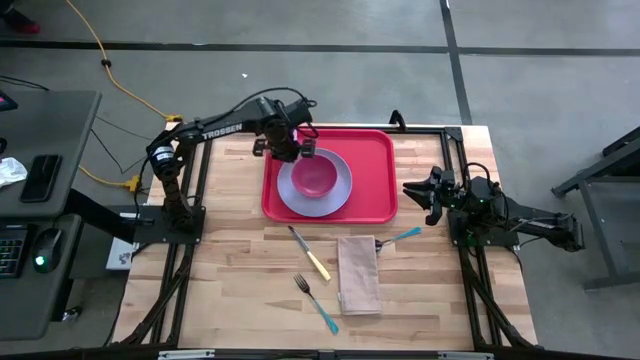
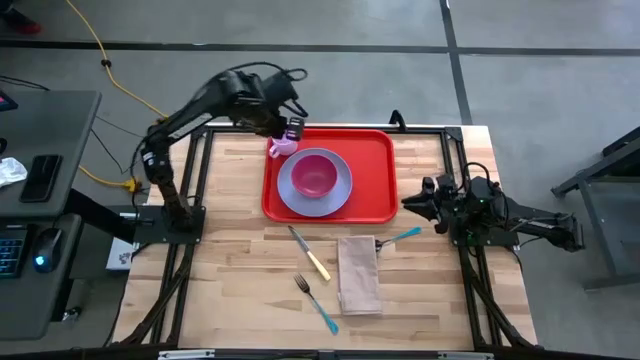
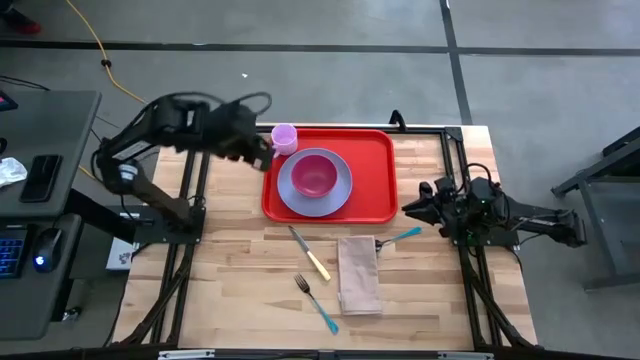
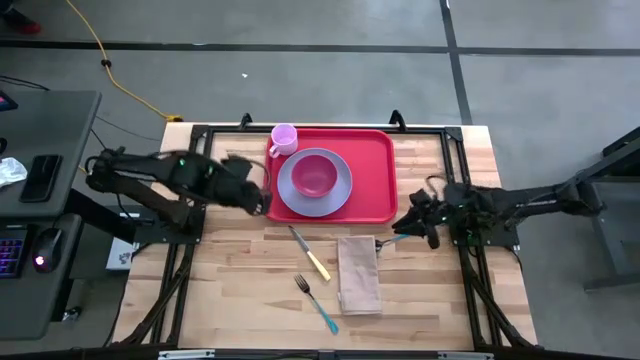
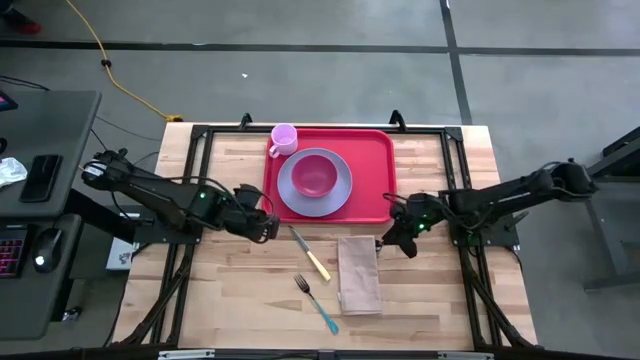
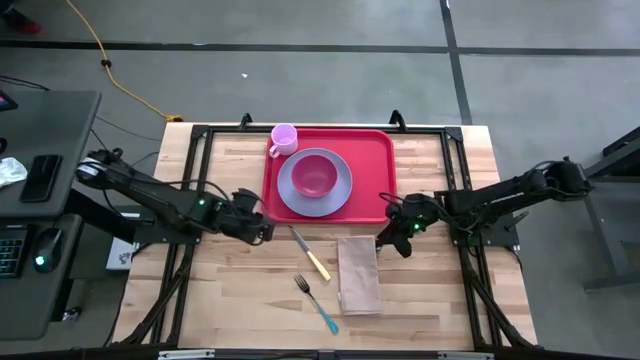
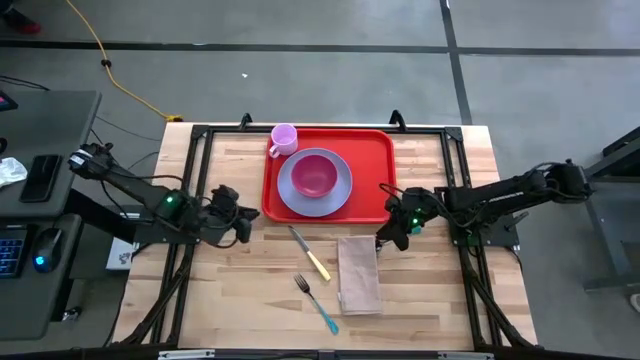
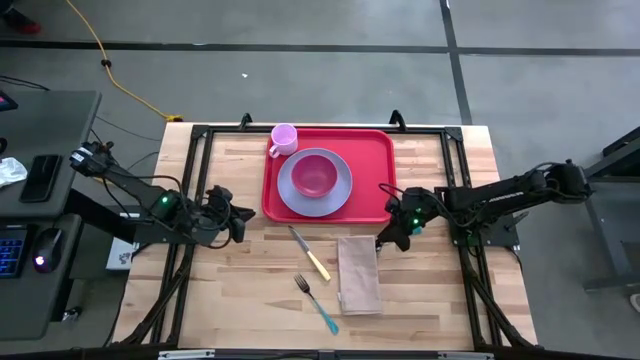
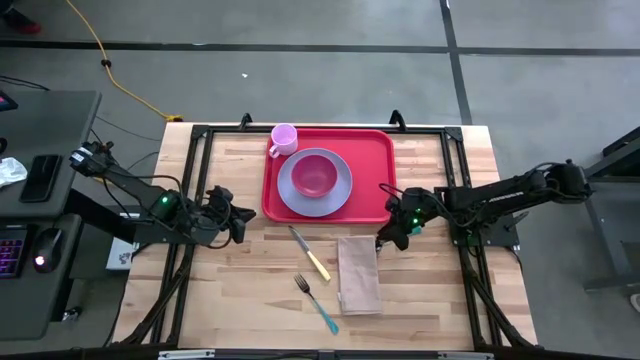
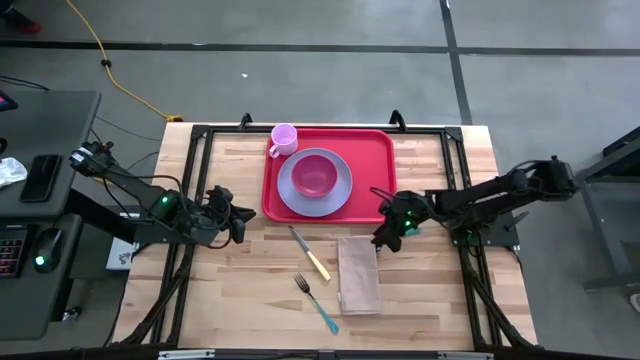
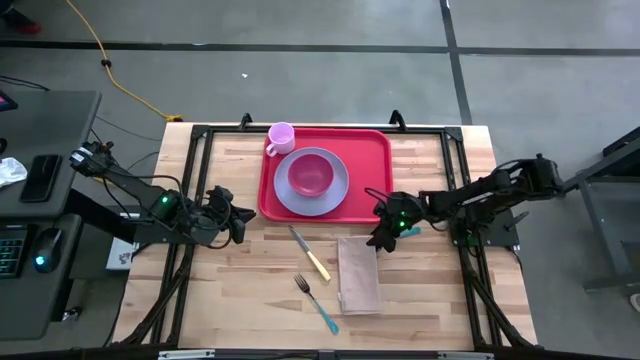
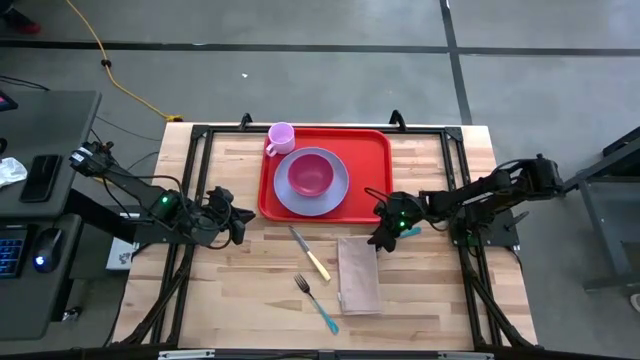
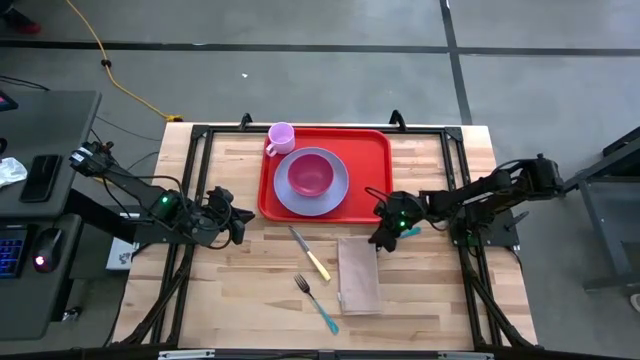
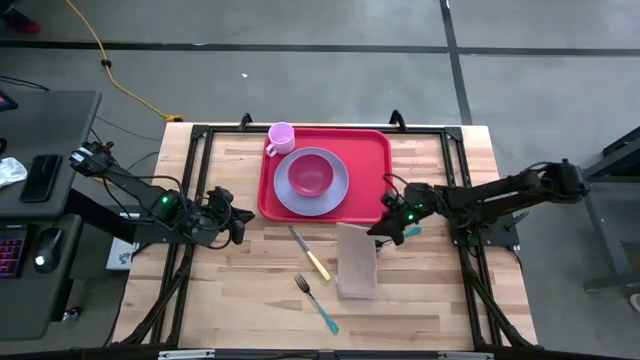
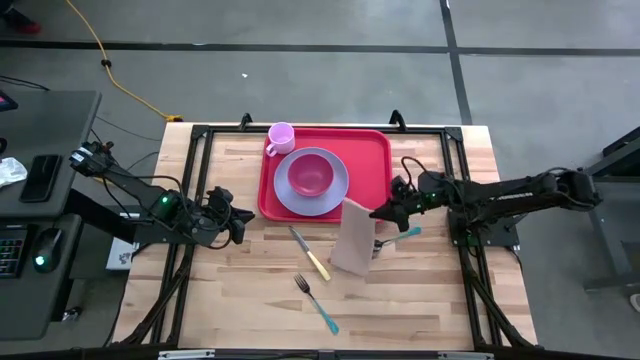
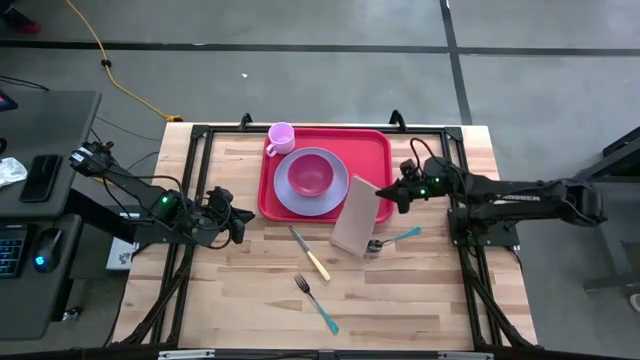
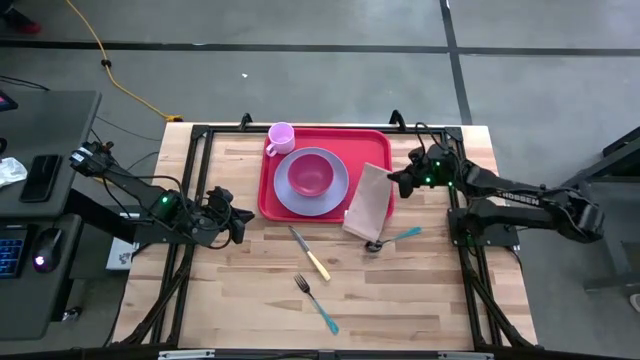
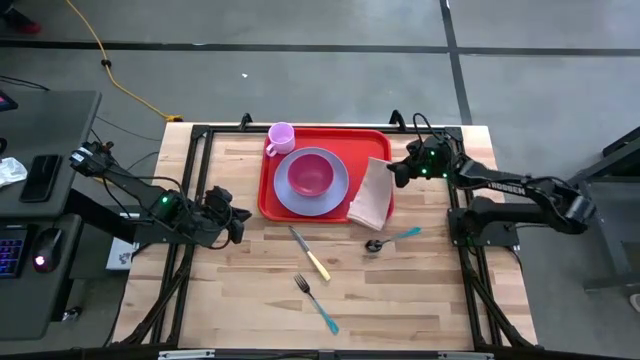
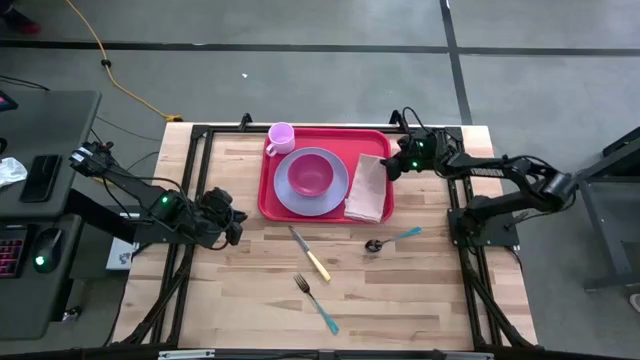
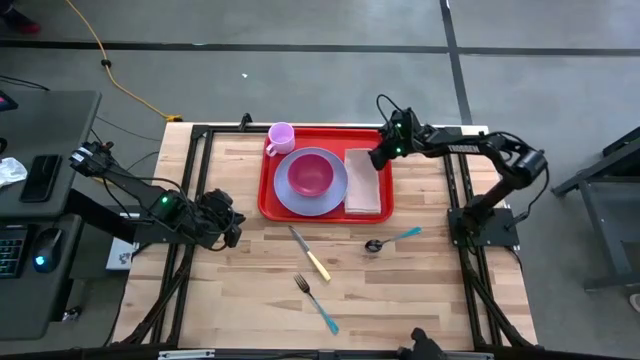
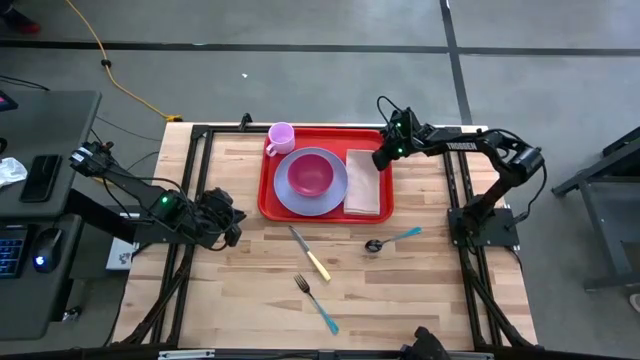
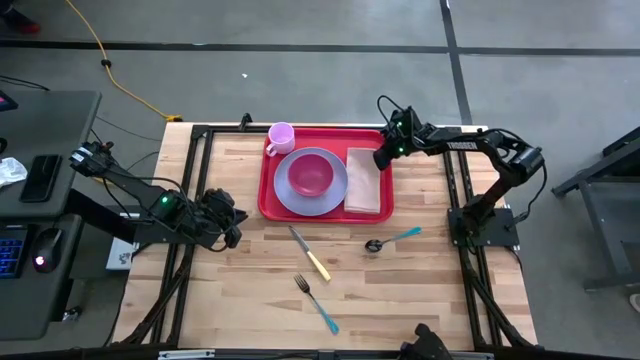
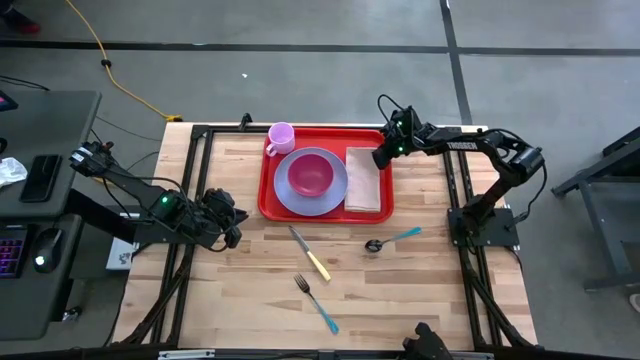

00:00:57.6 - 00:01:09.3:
Task: Set up tray
Put the light pink napkin to the right of the light blue plate on the orange serving tray

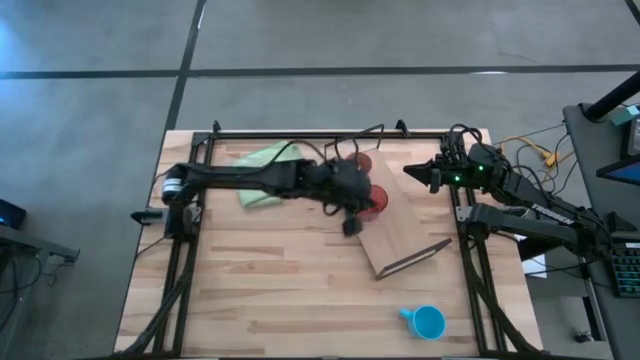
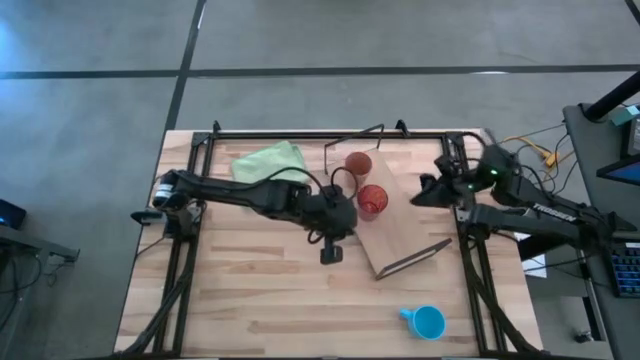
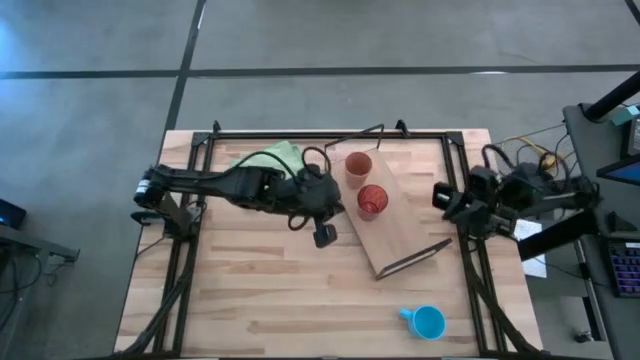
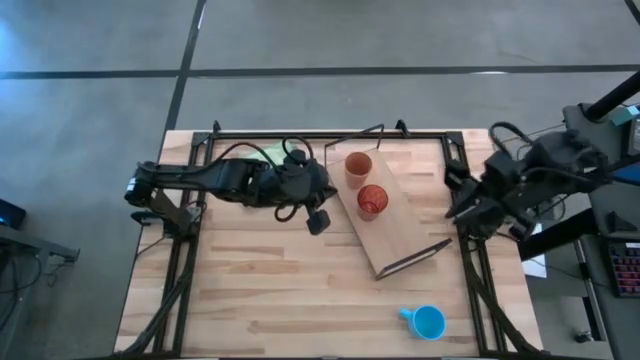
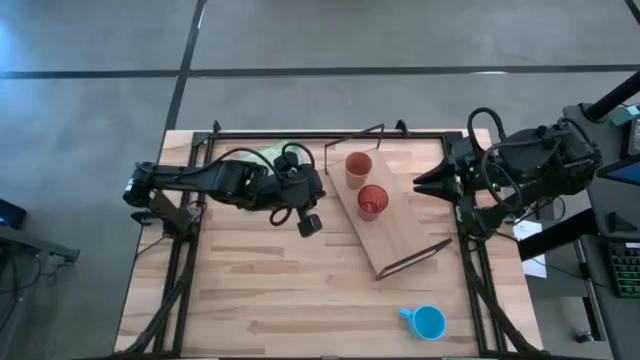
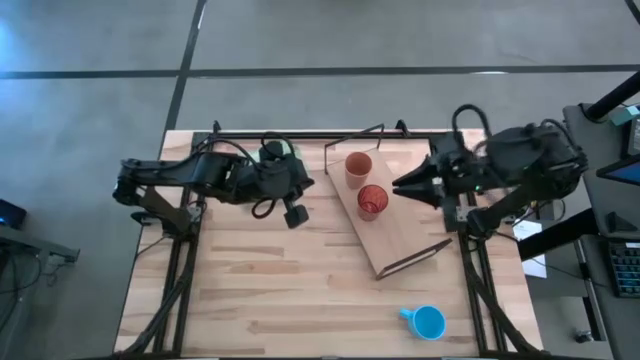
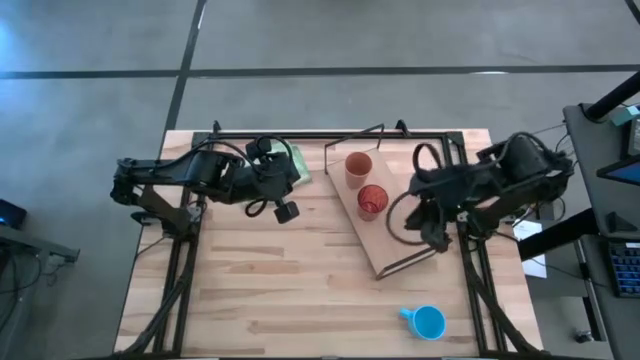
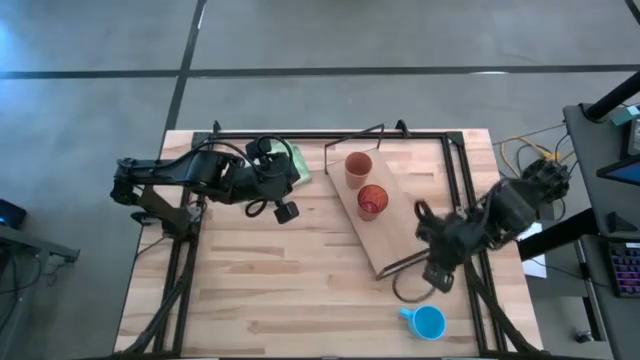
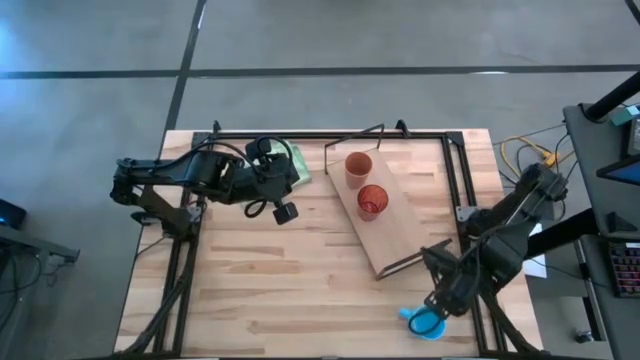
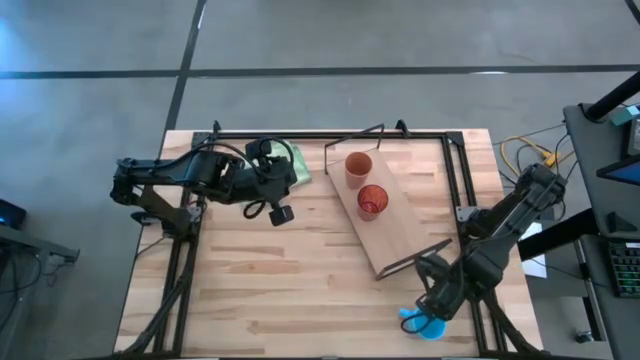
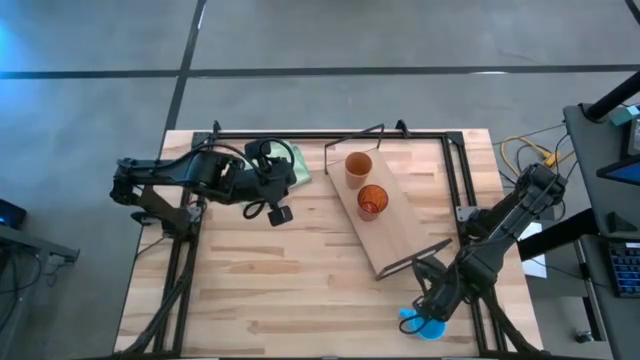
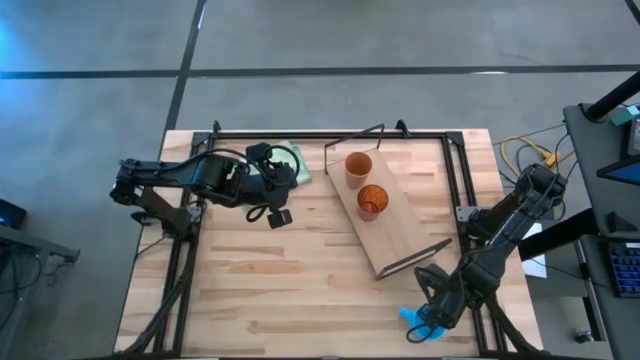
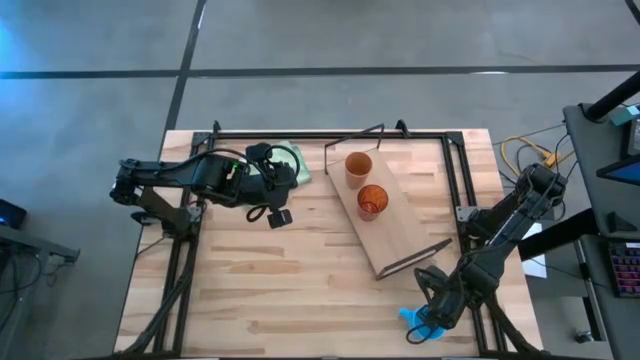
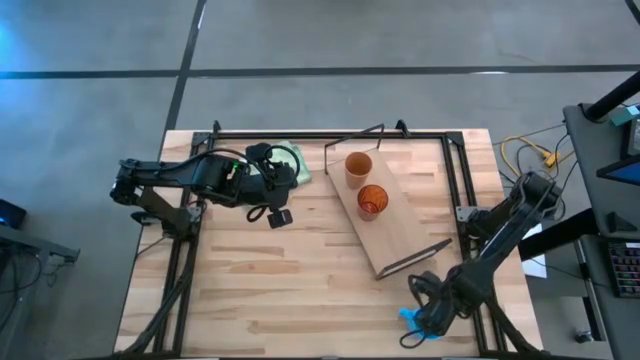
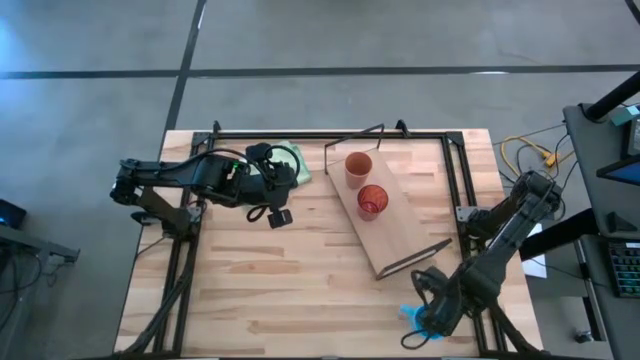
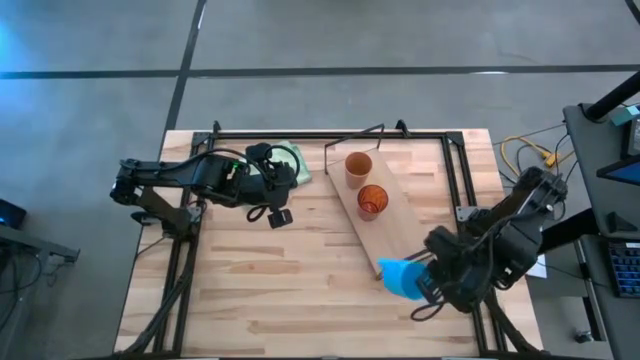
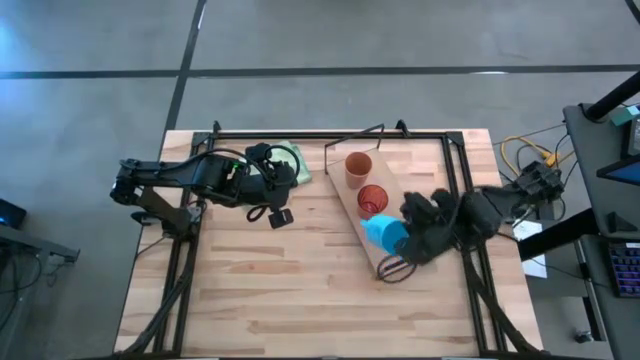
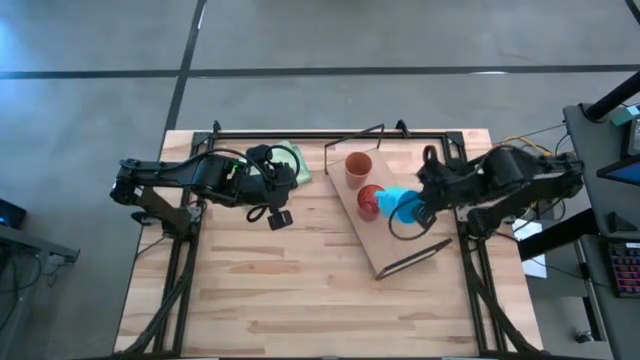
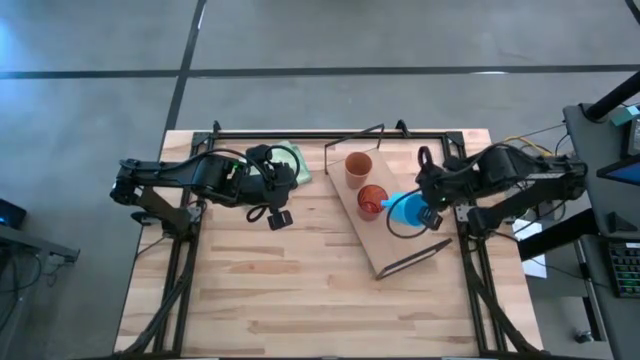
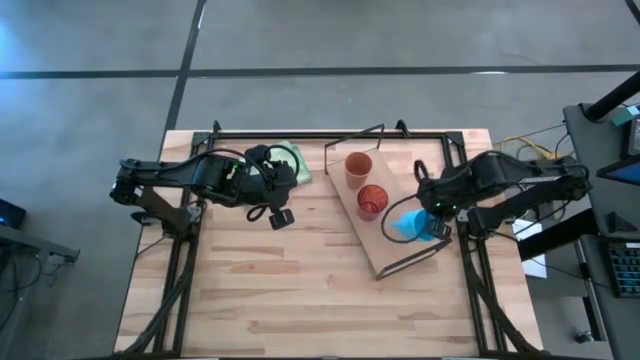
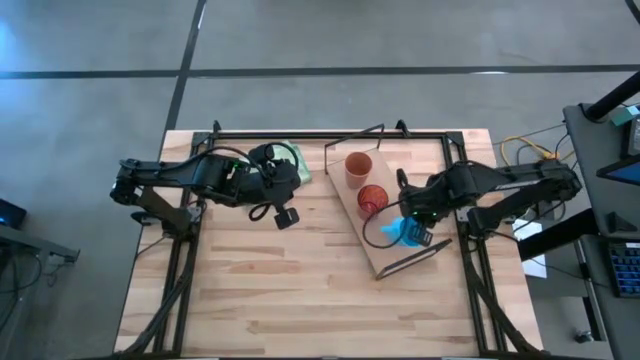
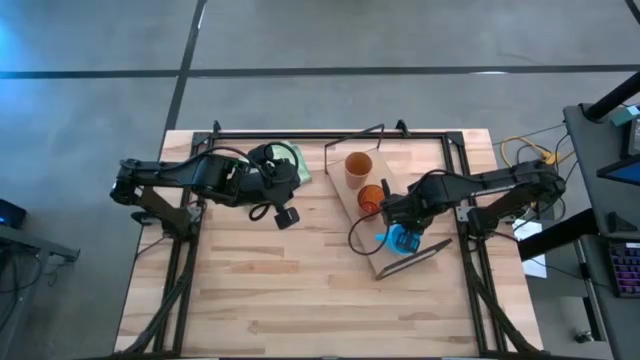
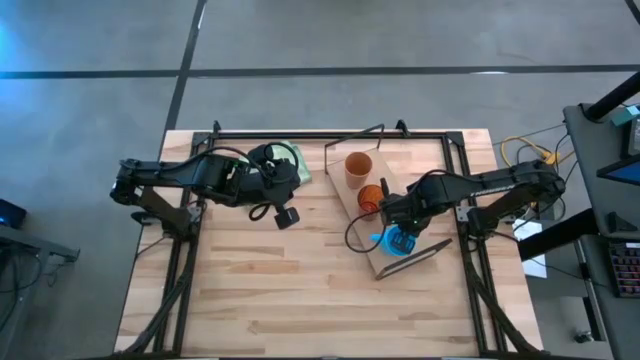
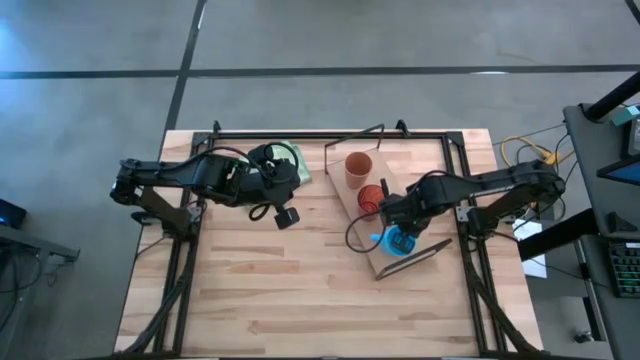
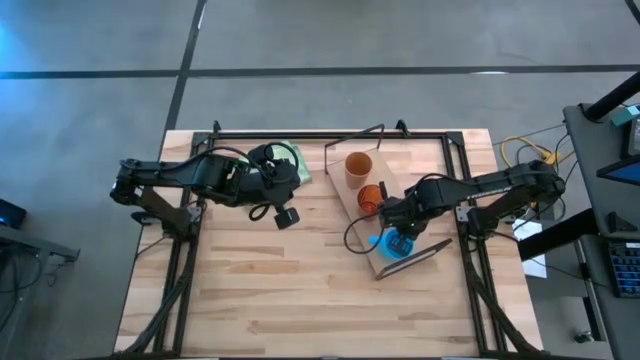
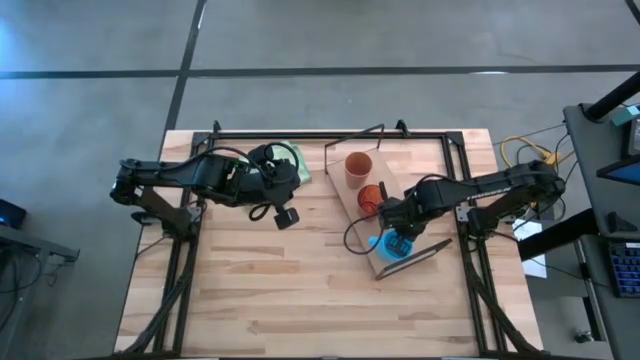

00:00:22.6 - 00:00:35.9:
Task: Stack small to large cups/mugs on shelf
Put the blue mug on the shelf
